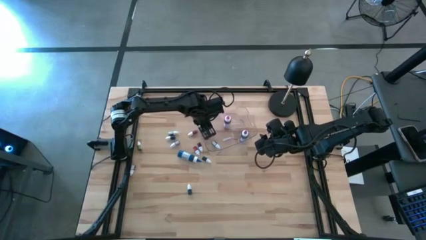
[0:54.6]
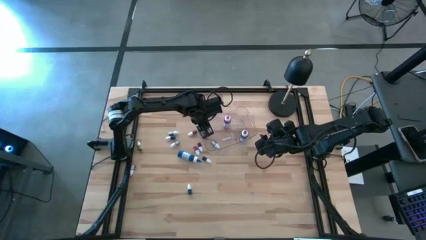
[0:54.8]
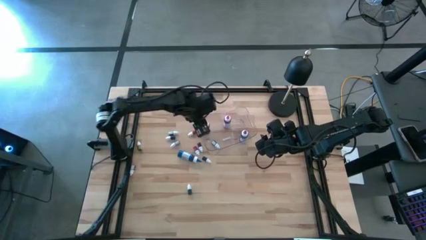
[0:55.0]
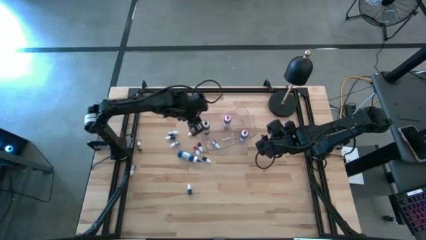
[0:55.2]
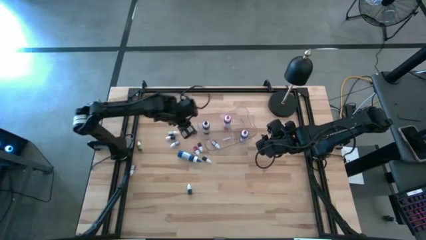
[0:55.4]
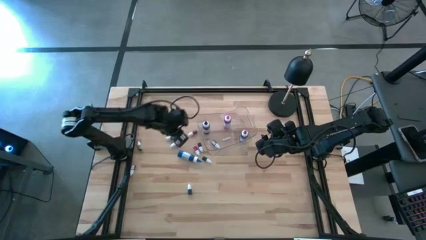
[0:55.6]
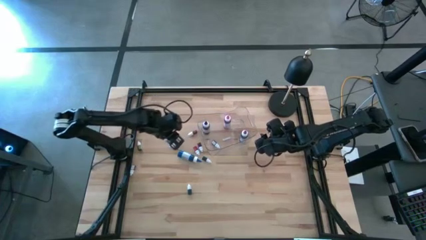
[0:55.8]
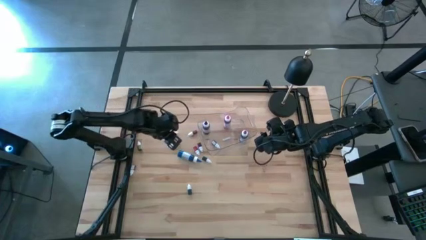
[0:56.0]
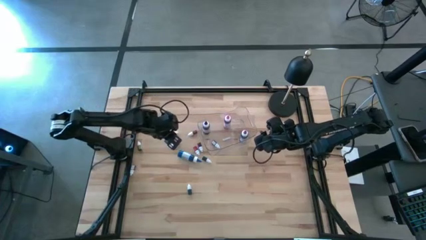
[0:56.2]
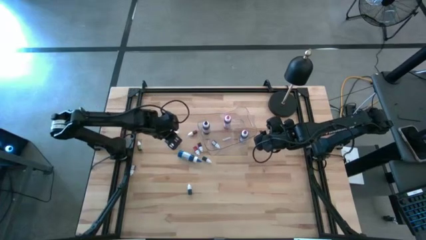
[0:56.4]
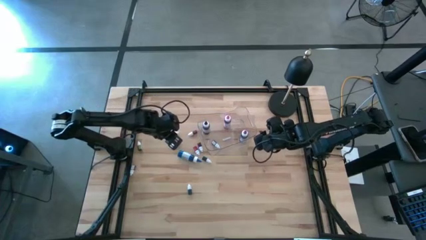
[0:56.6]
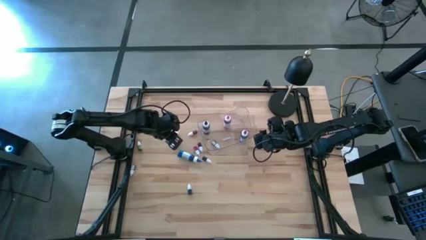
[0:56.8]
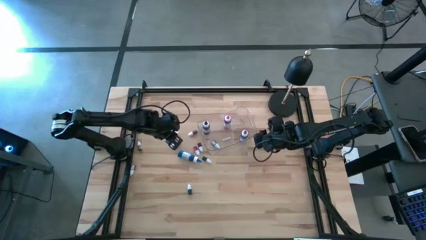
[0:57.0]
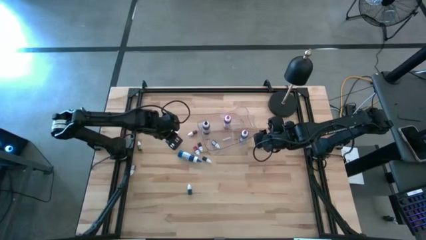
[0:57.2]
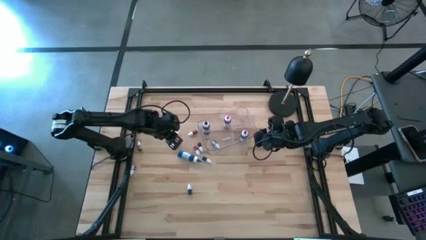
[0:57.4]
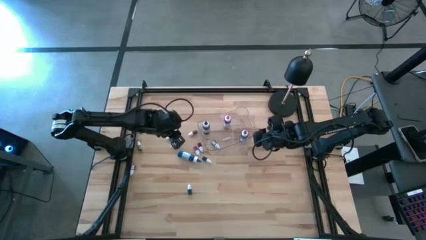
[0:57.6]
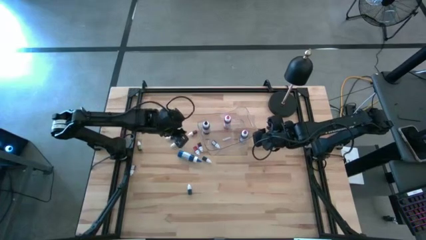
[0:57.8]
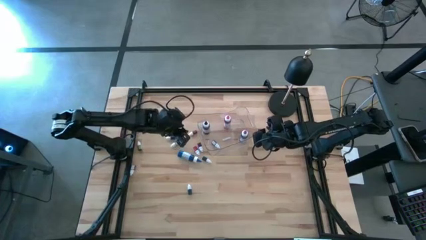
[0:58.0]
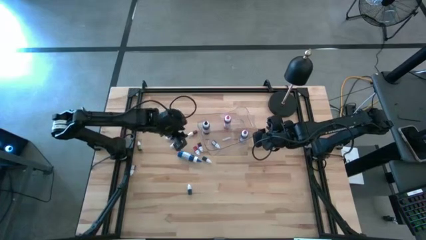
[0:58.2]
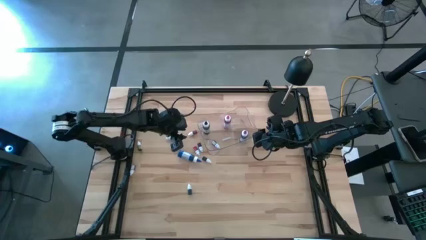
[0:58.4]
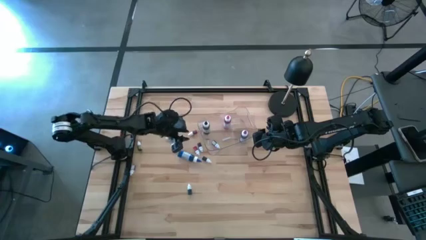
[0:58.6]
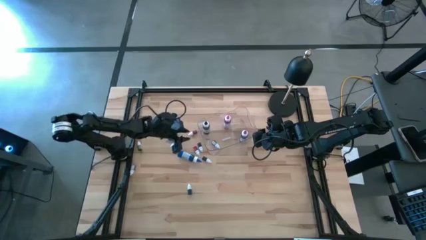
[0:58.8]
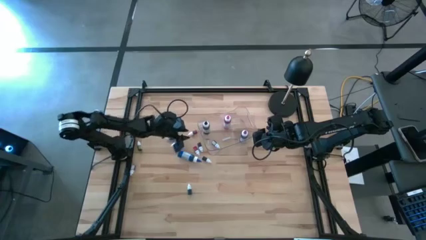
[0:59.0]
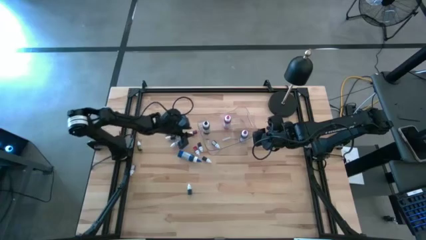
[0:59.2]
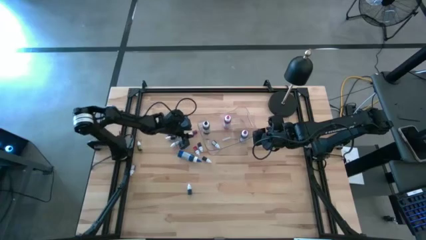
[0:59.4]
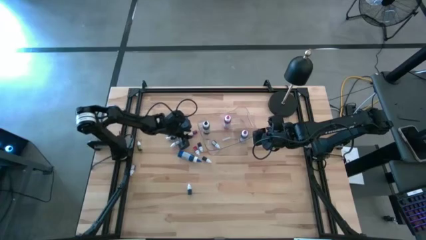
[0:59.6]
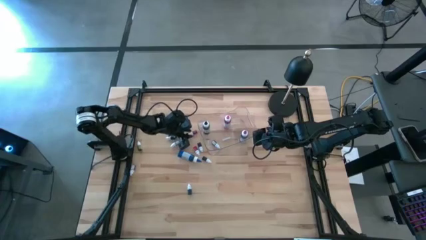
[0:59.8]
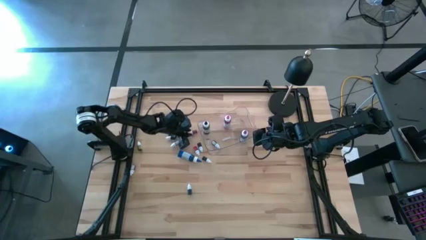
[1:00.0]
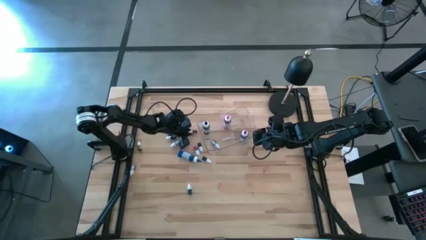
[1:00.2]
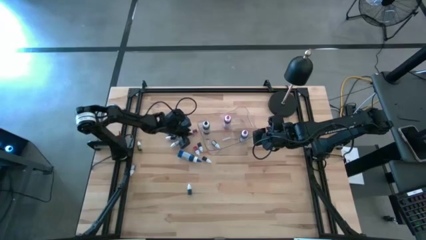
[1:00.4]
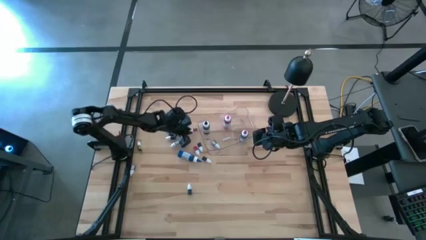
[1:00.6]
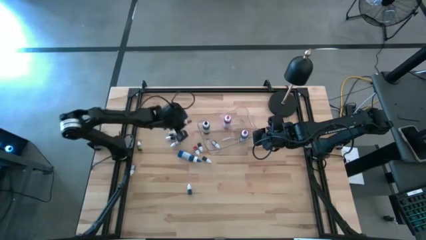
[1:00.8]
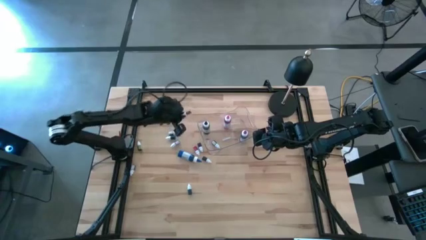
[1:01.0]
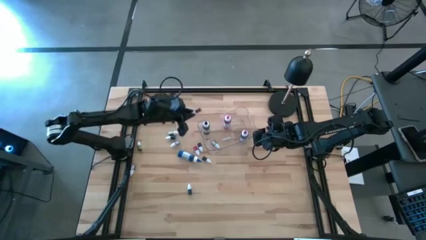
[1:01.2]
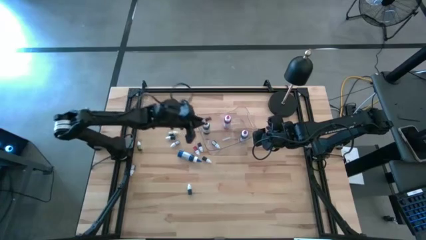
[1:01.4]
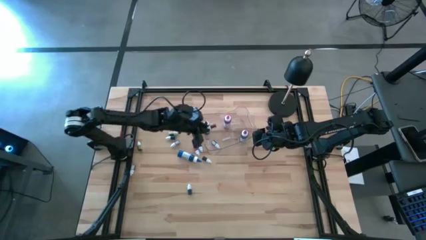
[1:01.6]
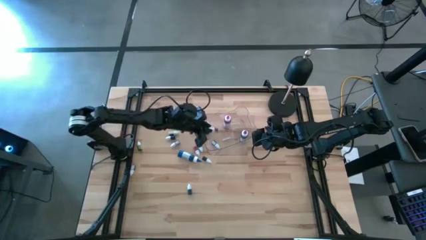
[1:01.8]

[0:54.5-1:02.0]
Task: Pick & Place food coloring
Put the small dark red food coloring bottle into the transparent container

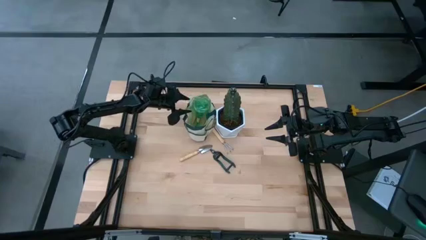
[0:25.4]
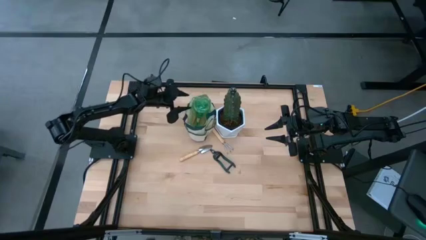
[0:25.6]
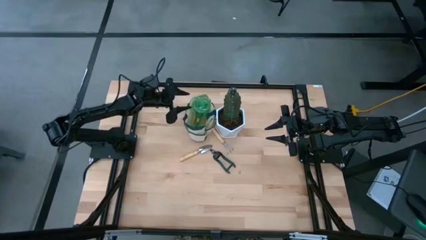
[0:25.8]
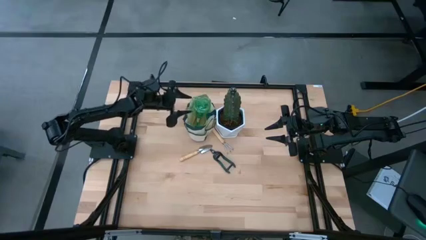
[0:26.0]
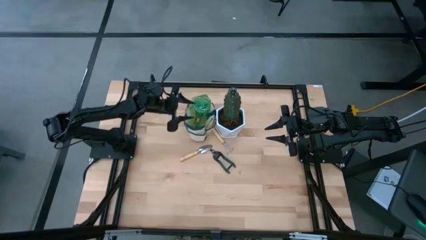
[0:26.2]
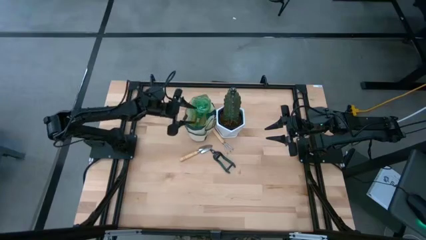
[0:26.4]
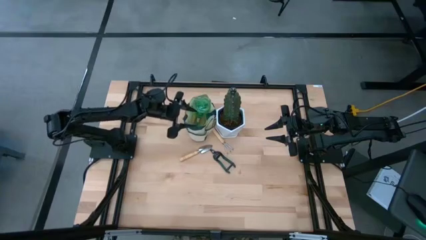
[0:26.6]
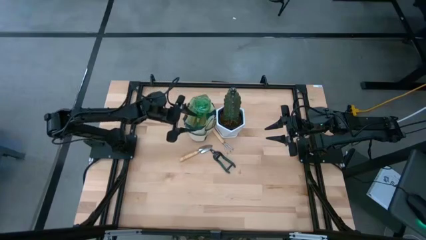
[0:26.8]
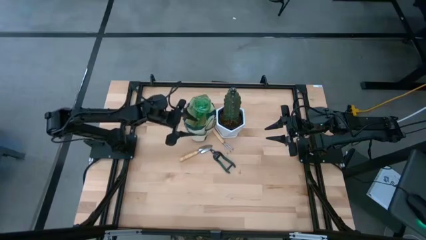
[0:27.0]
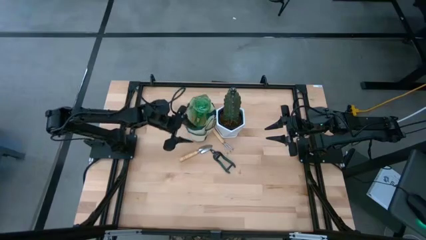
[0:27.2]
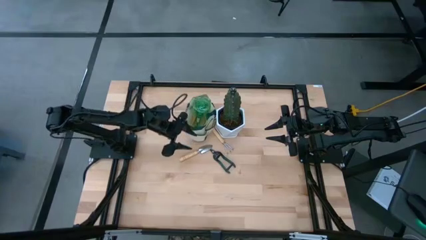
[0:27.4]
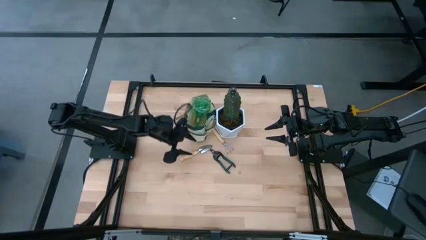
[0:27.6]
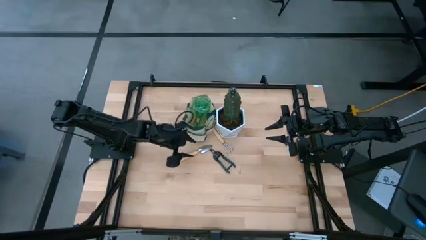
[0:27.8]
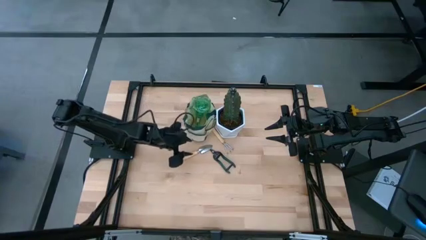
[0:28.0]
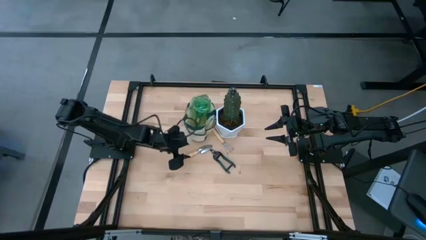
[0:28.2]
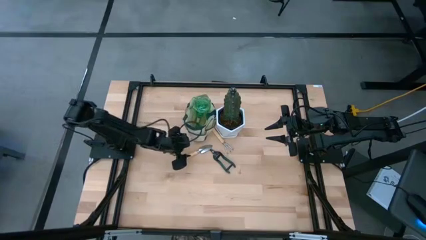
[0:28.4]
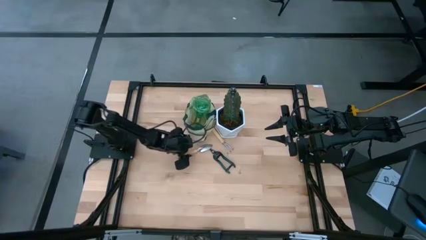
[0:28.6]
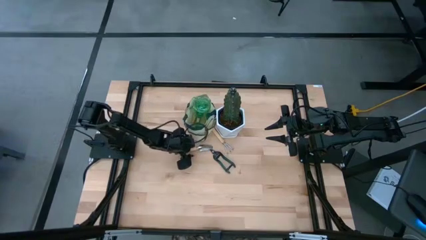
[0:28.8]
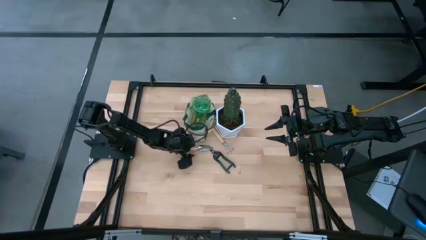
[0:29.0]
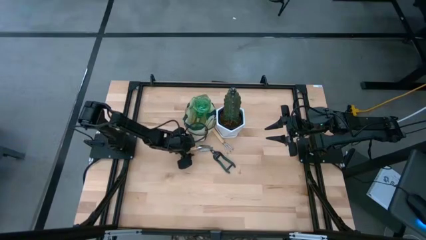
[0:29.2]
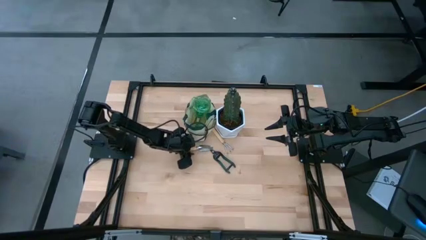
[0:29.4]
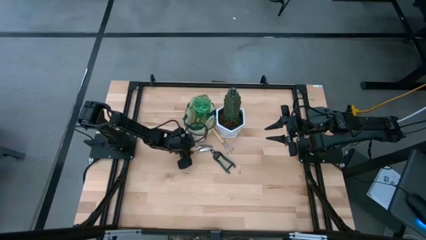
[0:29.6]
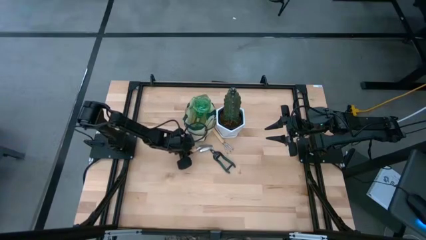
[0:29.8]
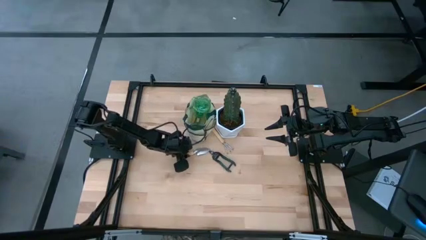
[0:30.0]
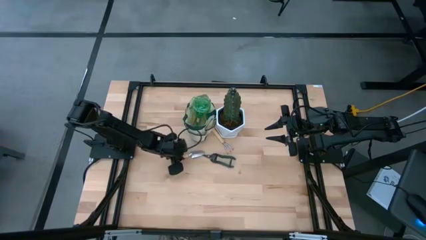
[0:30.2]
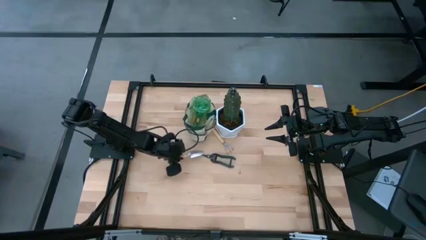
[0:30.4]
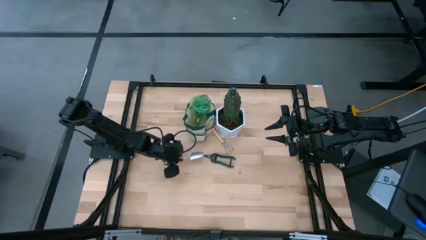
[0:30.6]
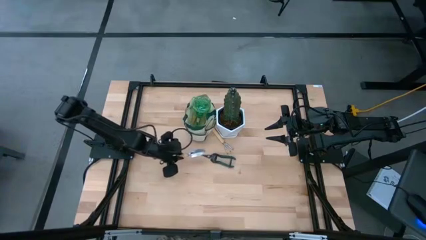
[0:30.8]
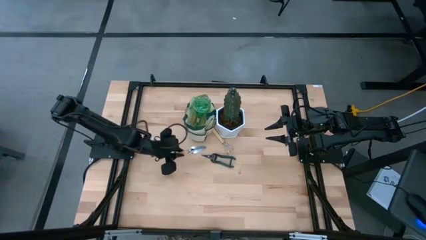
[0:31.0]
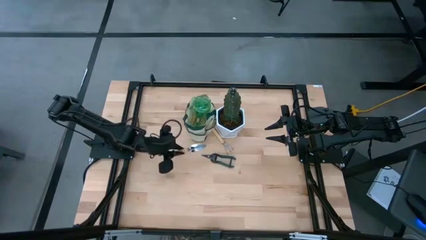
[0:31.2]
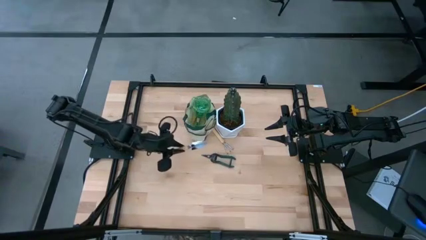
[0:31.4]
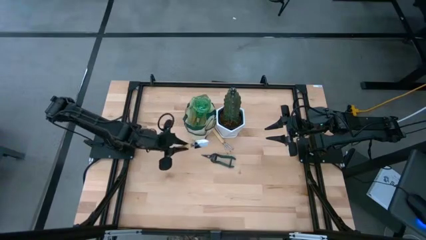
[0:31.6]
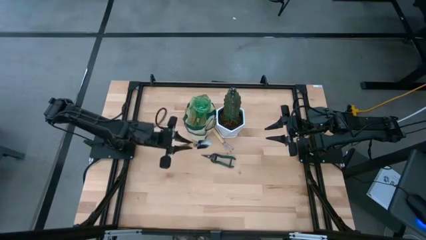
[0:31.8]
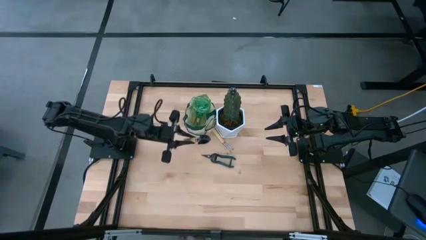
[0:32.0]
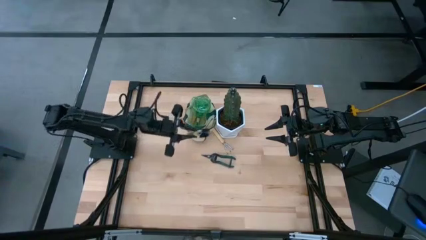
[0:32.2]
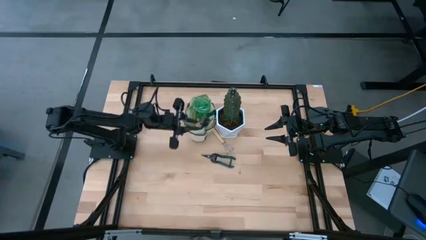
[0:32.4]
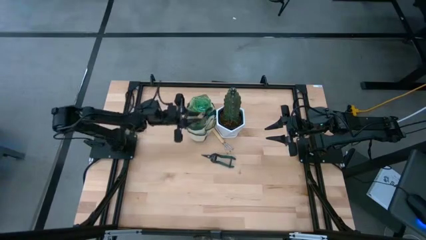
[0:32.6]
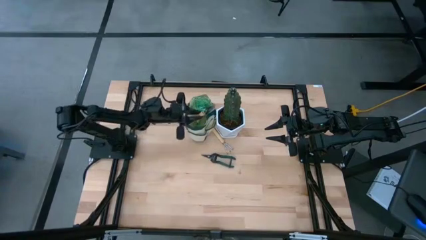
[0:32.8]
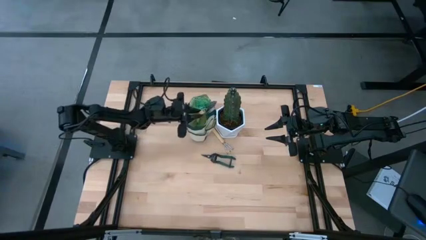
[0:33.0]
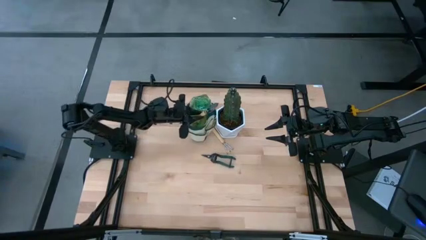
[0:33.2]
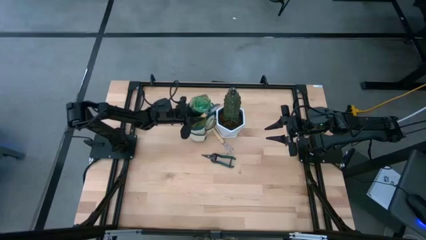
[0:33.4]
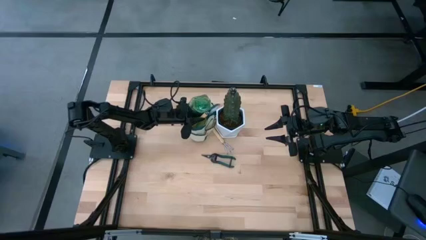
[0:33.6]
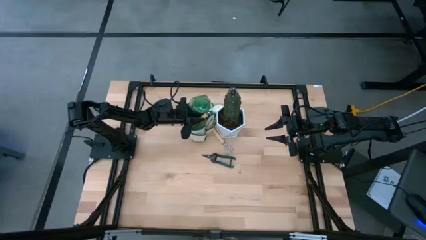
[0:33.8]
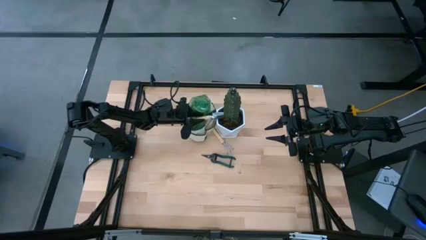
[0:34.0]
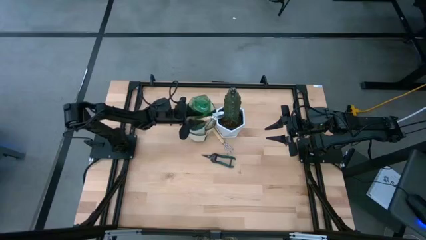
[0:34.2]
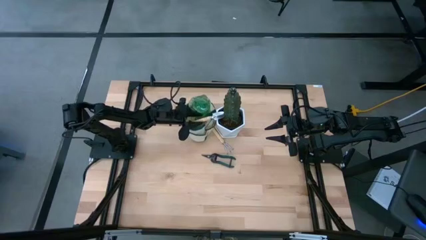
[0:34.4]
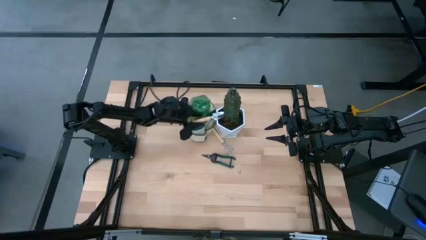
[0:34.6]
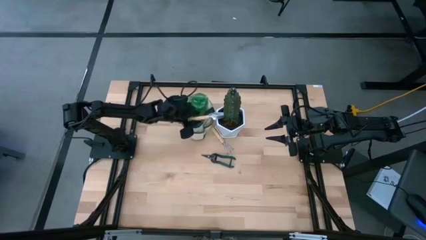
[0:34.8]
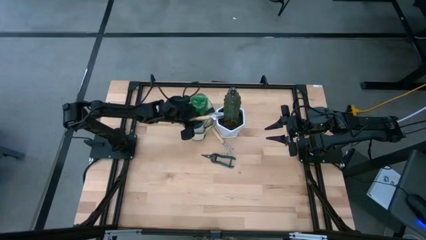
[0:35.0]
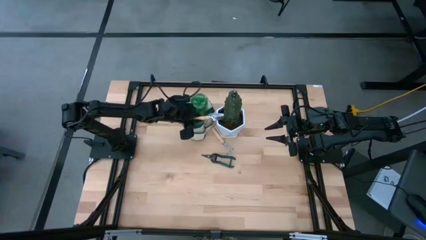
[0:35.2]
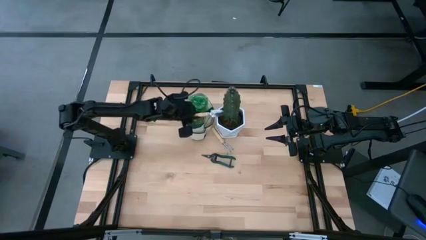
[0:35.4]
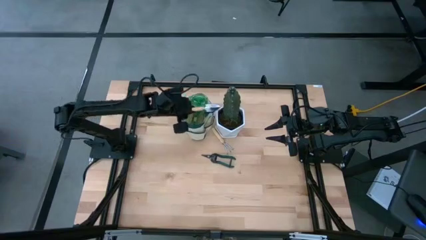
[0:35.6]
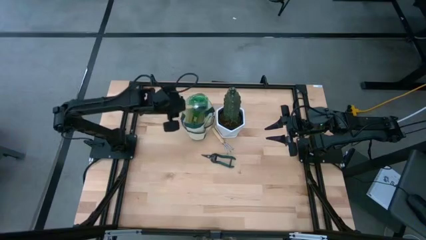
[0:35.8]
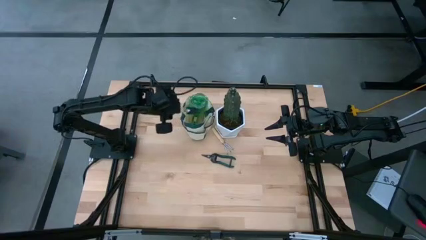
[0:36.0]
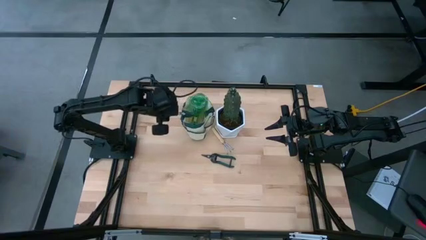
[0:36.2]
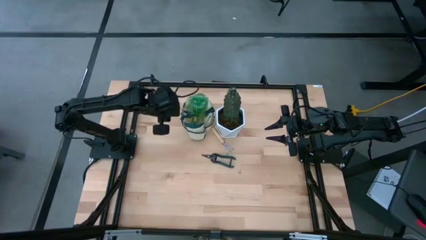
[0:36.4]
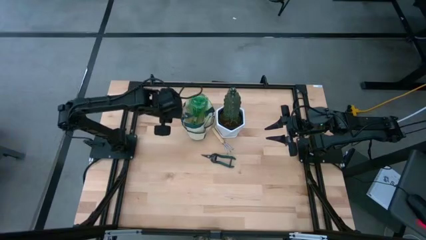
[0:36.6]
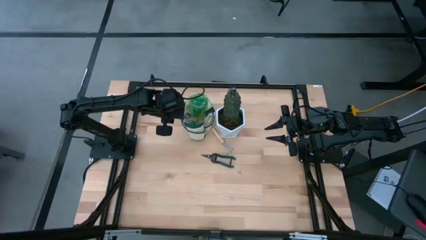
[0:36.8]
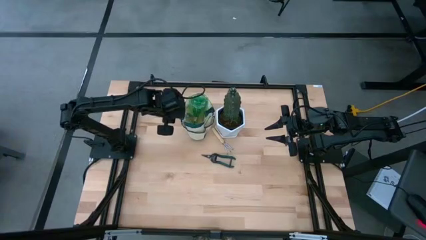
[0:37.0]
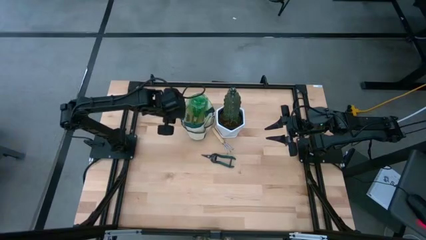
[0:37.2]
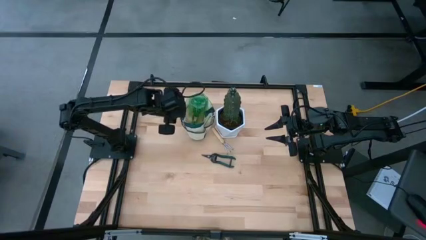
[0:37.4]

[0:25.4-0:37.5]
Task: Pick & Place Garden tools in Gardening bag
Put the brown trowel into the brown gardening bag
